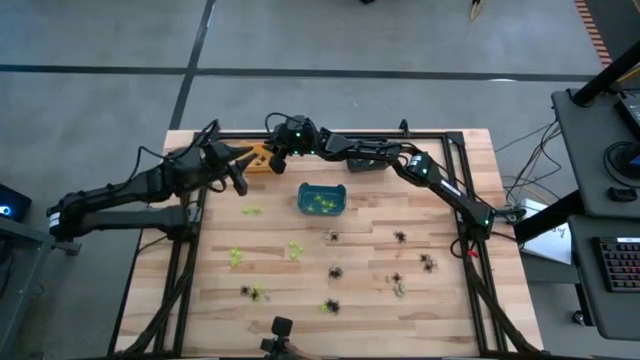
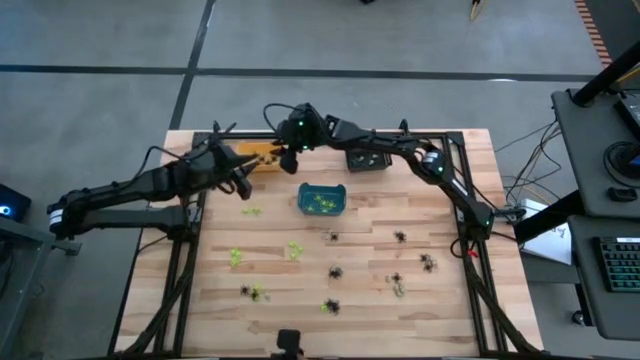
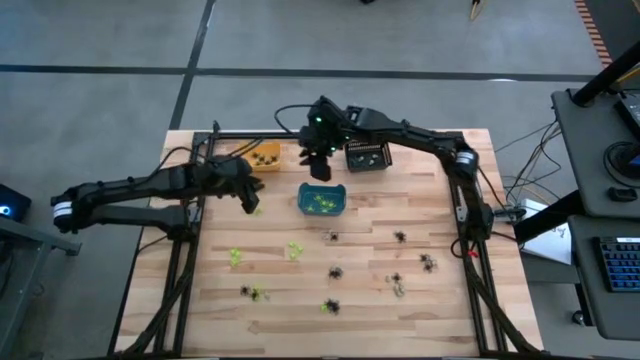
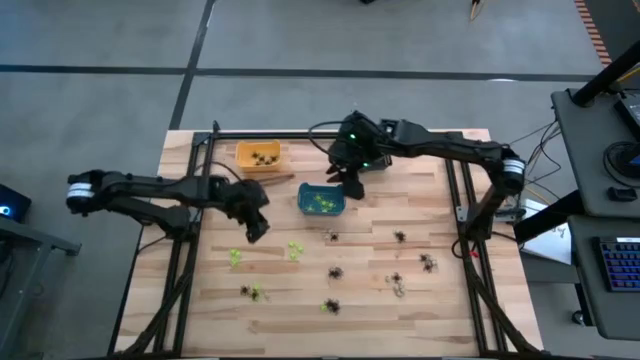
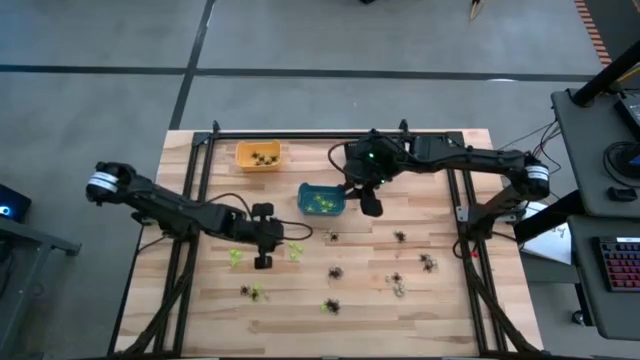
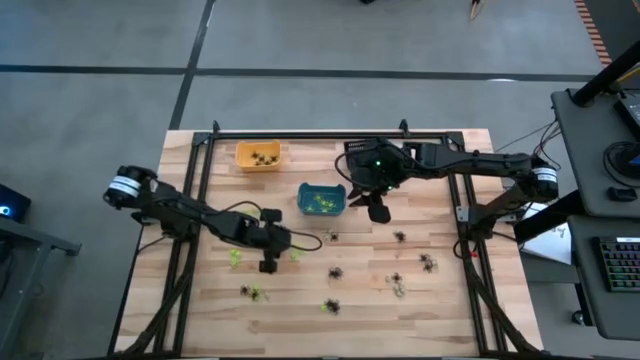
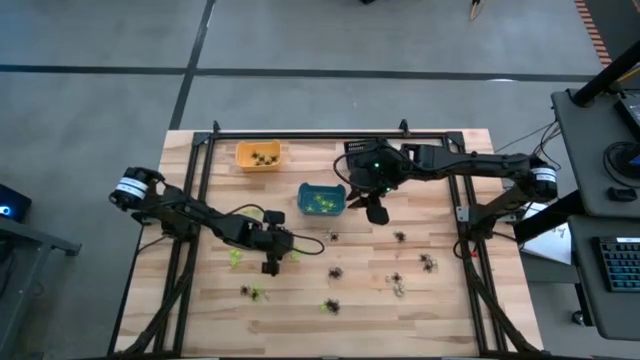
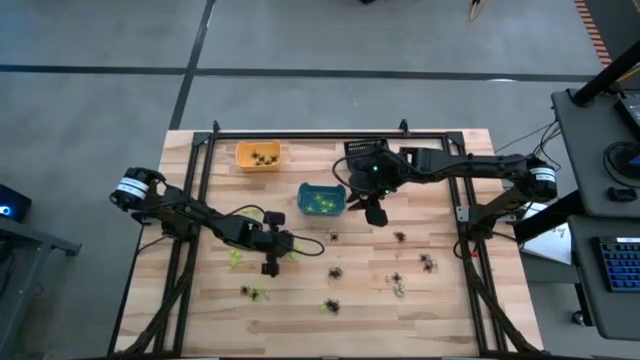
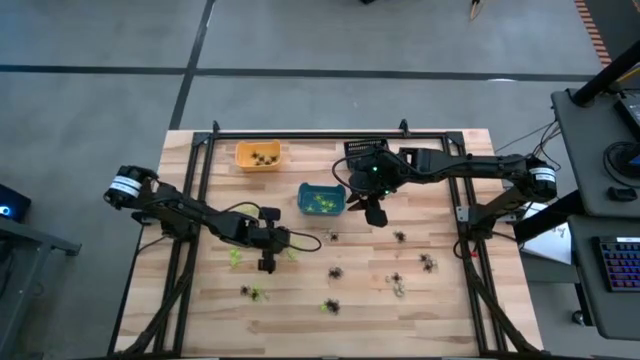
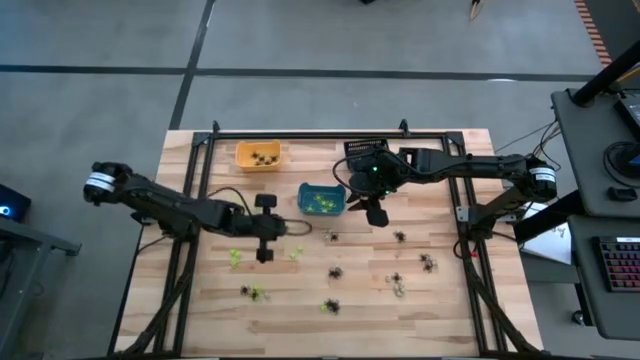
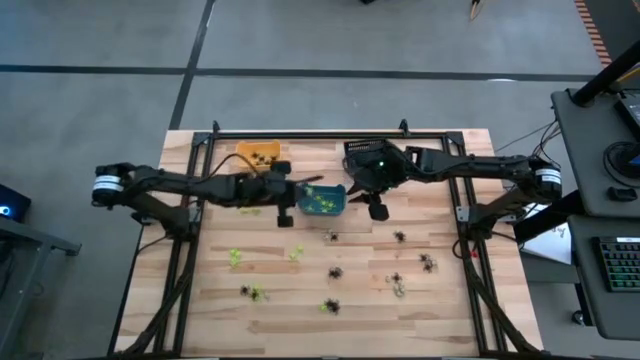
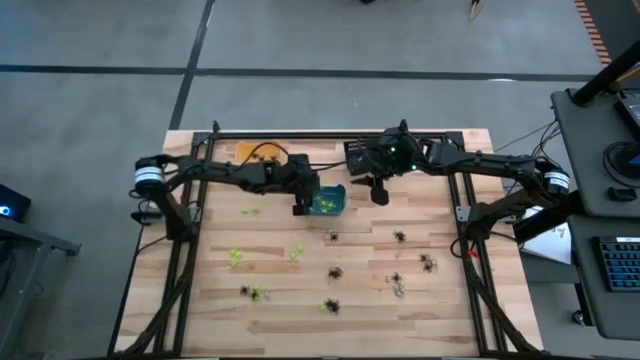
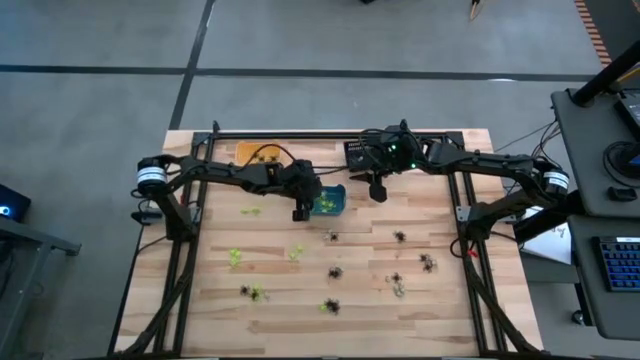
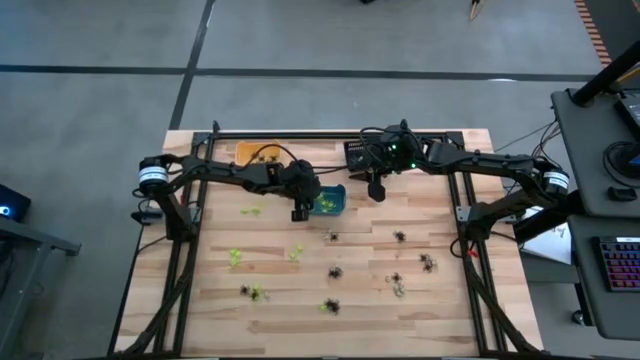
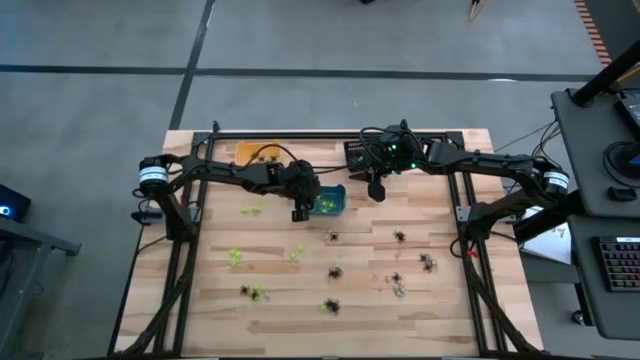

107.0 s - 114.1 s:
Task: Sort Halloween decoration
Put the green spider toy into the blue bin

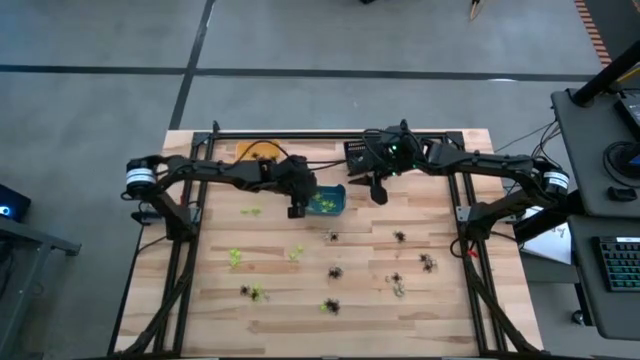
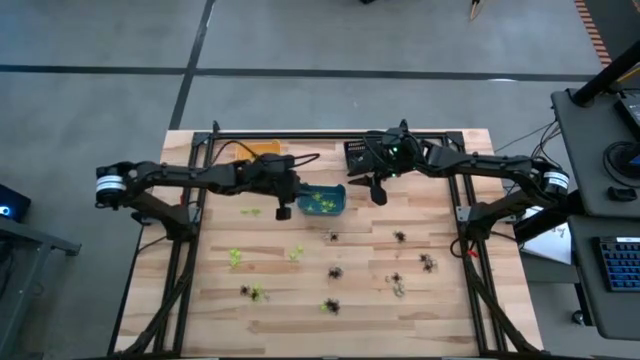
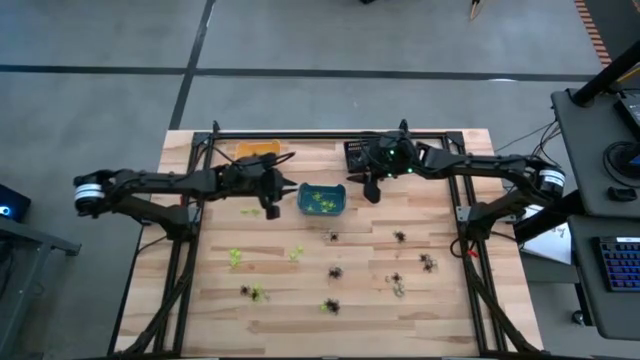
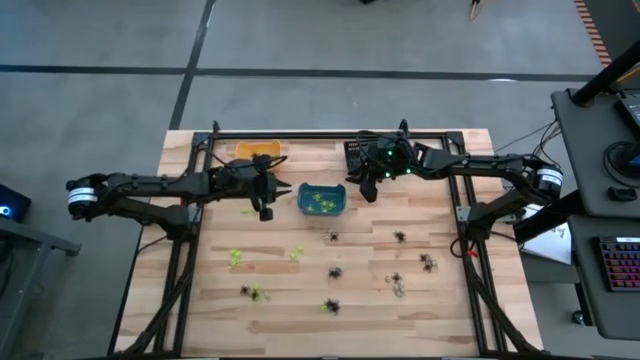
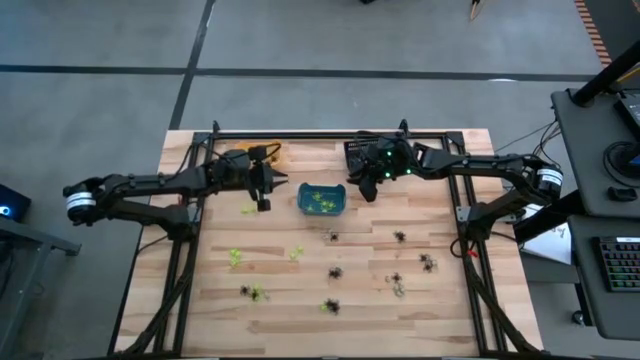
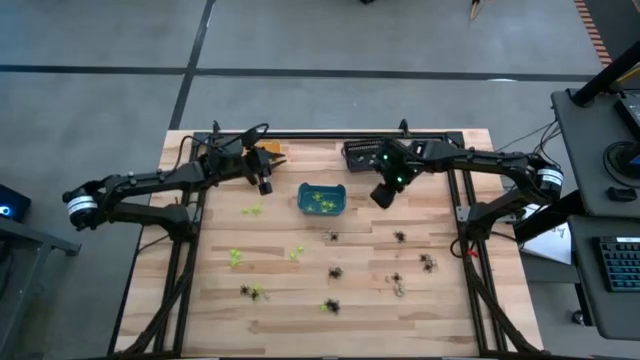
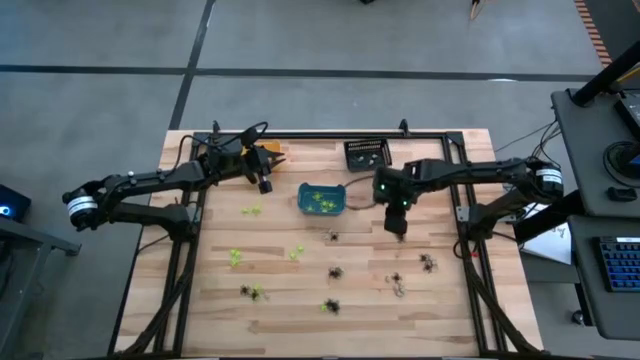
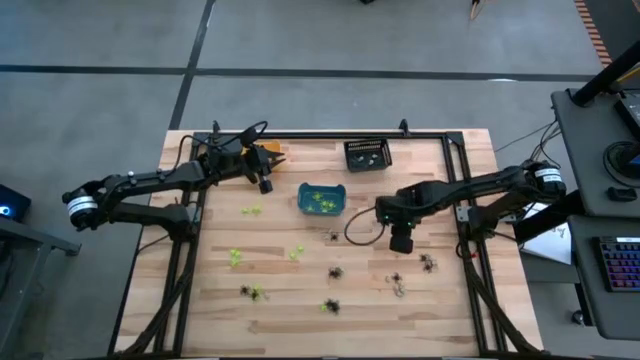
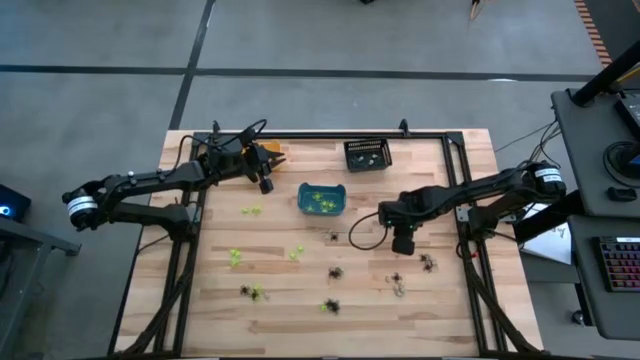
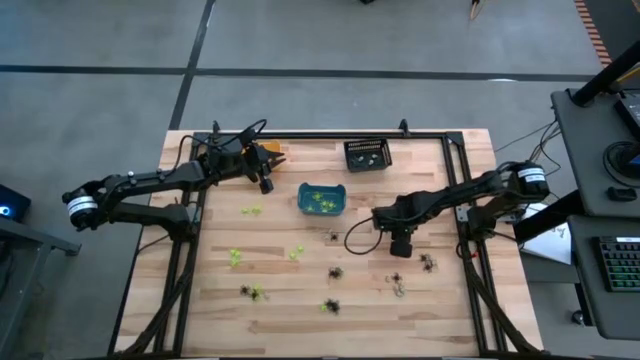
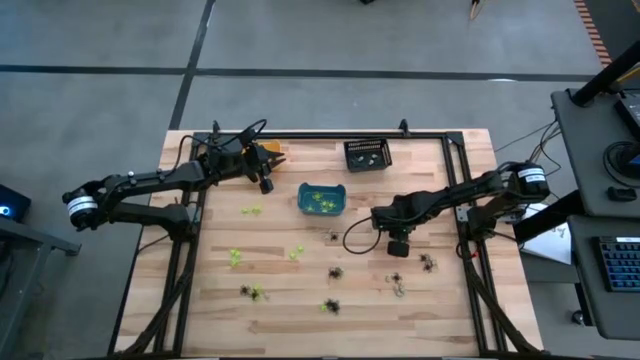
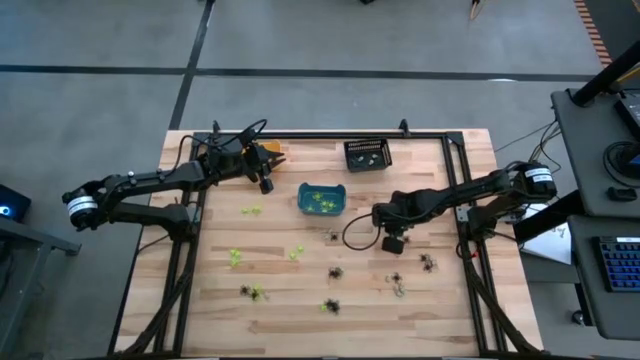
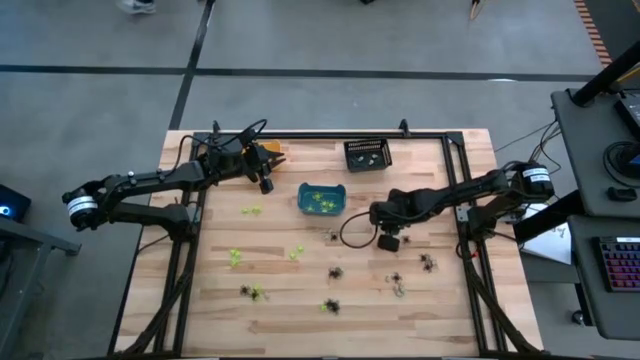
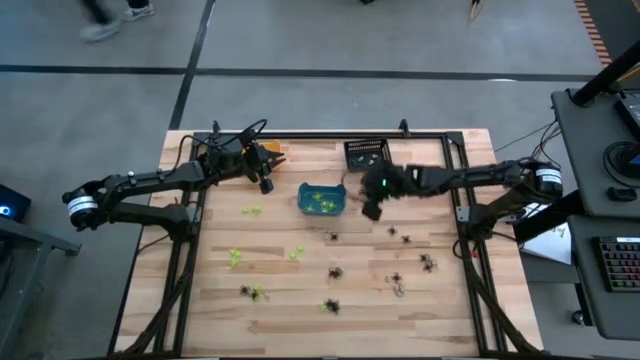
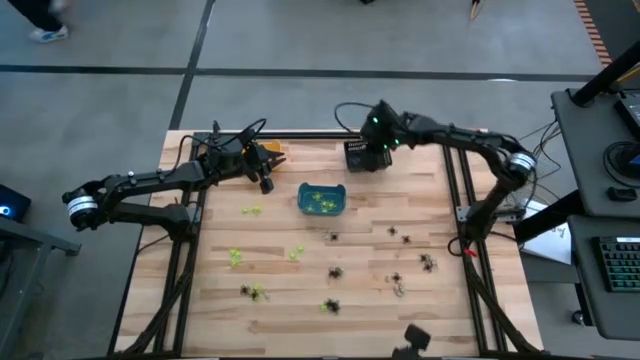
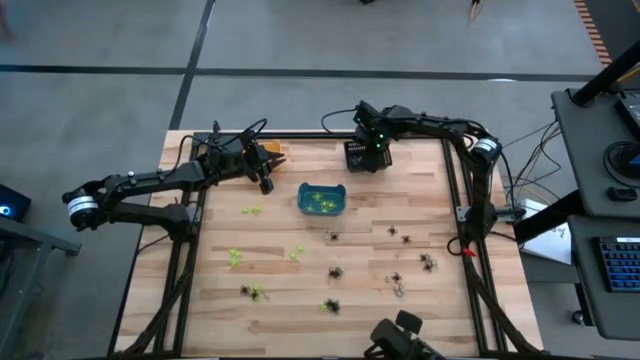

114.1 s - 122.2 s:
Put the white skull toy into the black bin

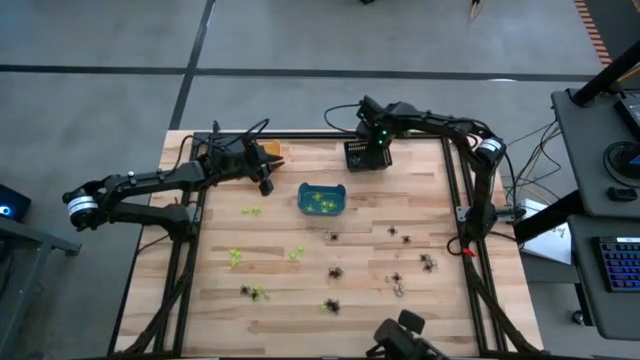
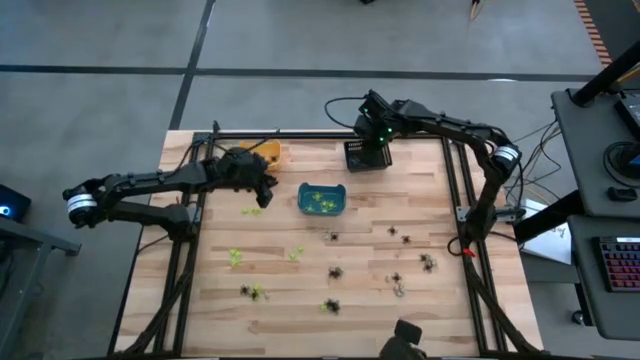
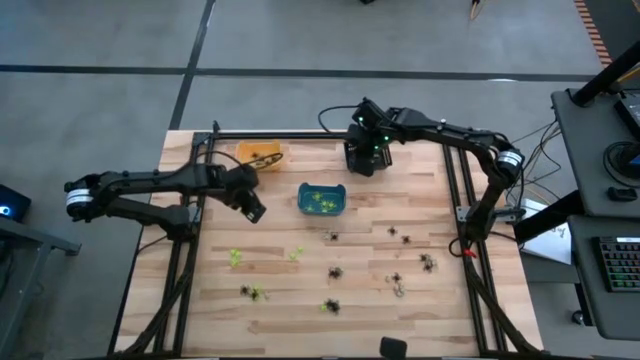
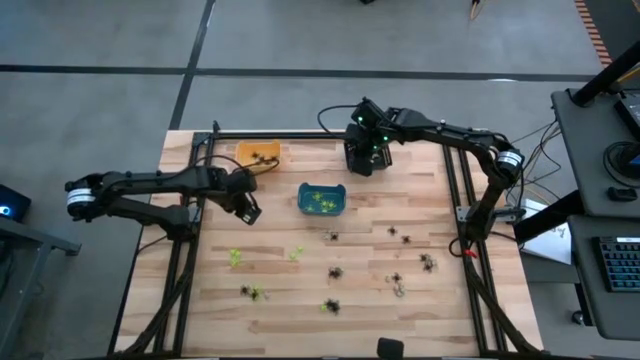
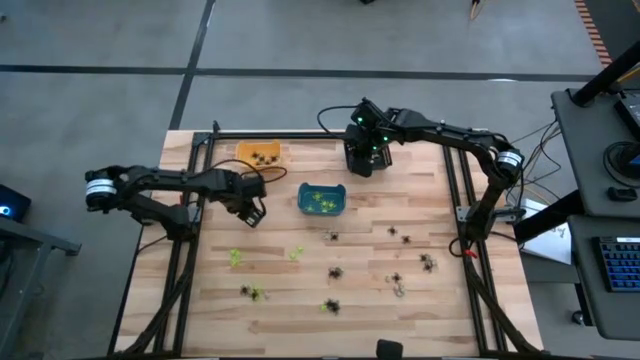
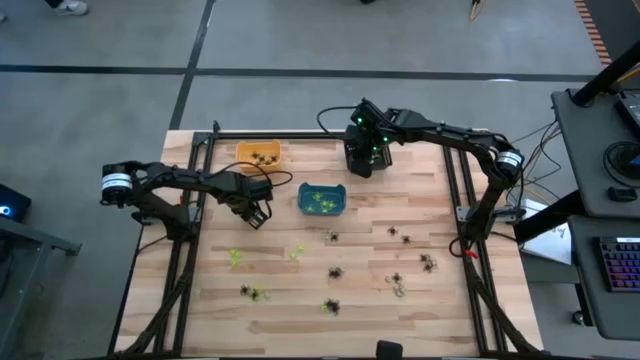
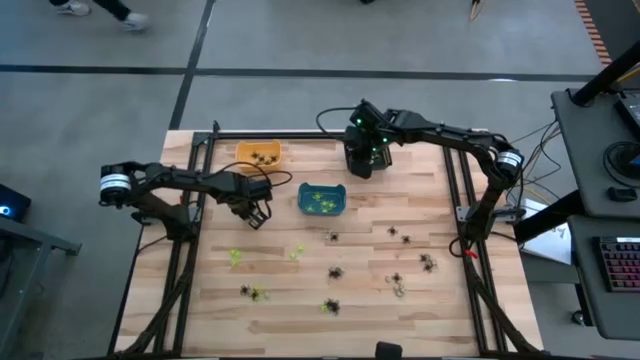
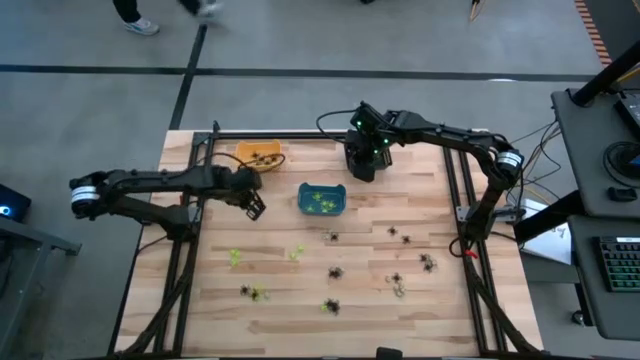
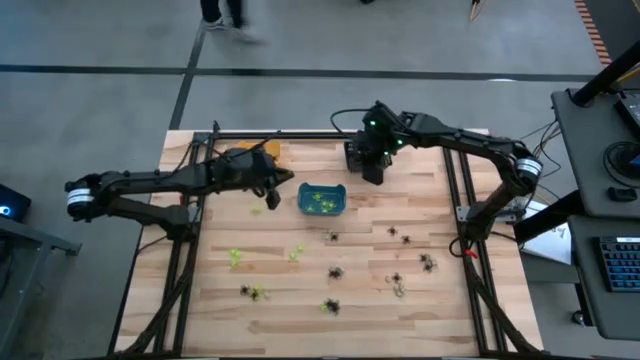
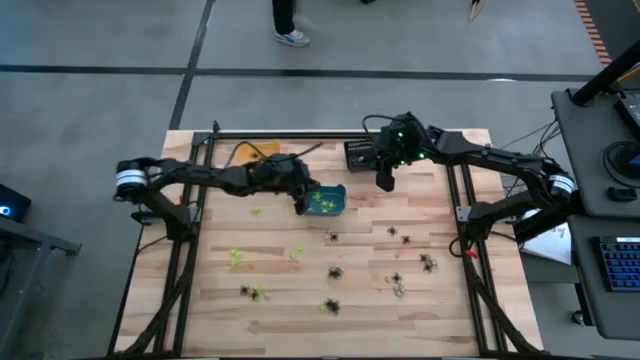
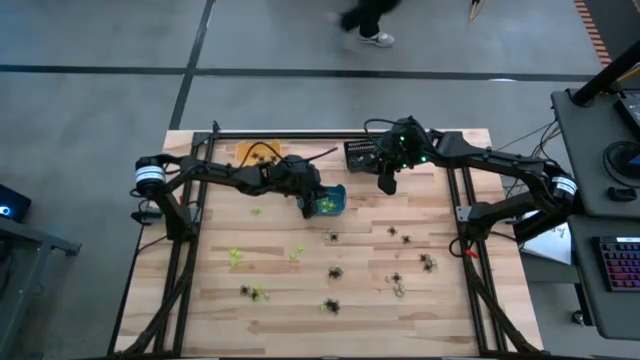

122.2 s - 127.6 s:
Put the green spider toy into the blue bin
